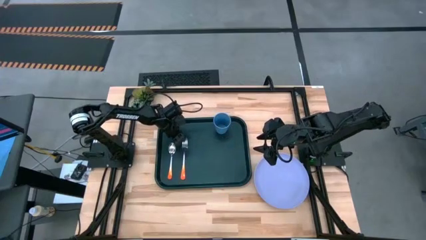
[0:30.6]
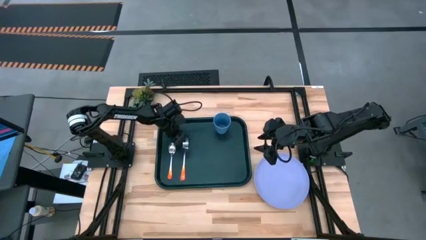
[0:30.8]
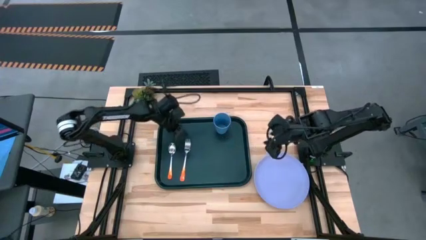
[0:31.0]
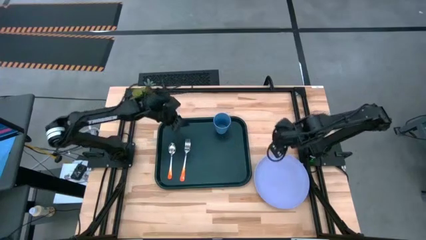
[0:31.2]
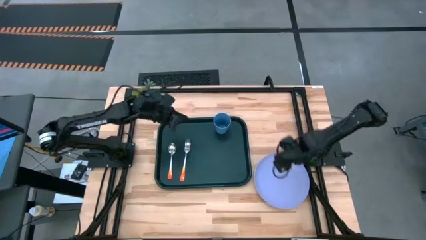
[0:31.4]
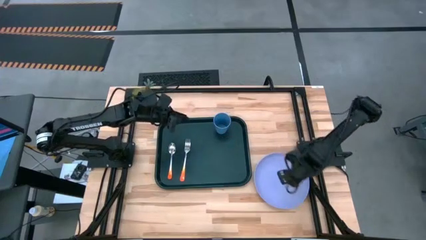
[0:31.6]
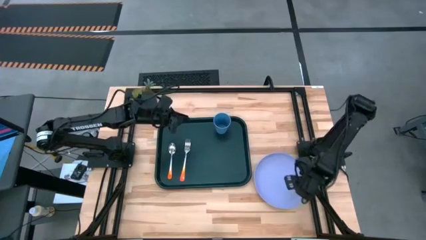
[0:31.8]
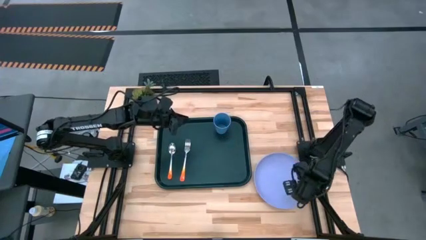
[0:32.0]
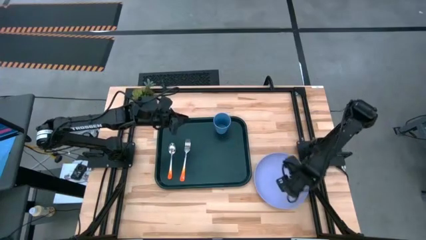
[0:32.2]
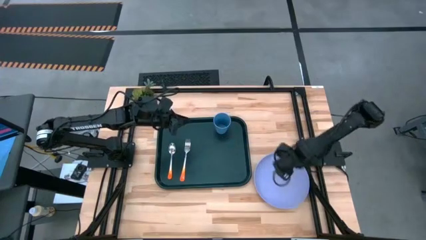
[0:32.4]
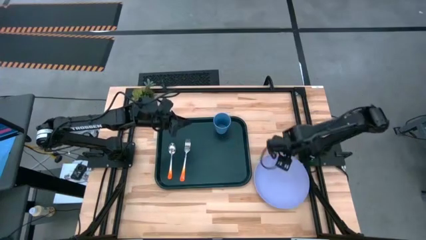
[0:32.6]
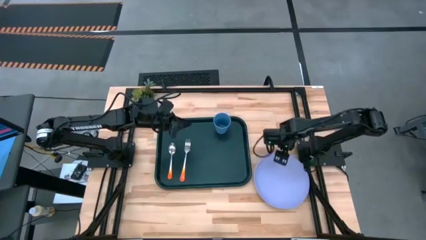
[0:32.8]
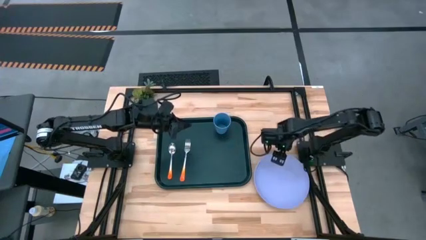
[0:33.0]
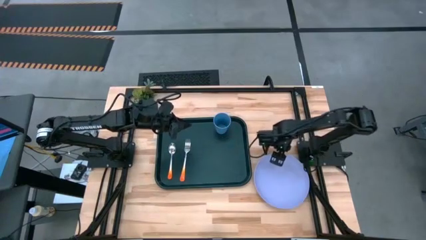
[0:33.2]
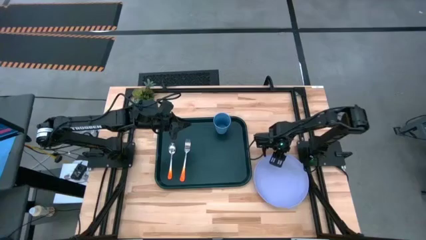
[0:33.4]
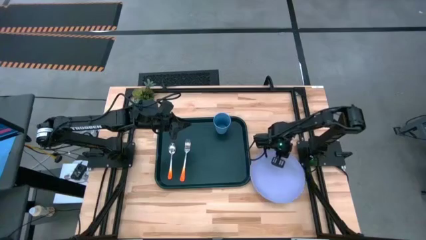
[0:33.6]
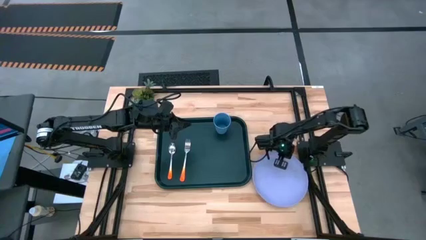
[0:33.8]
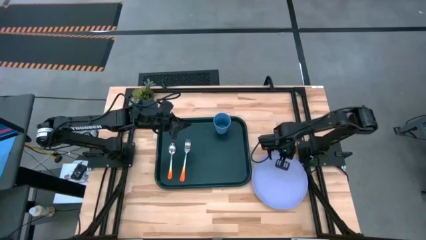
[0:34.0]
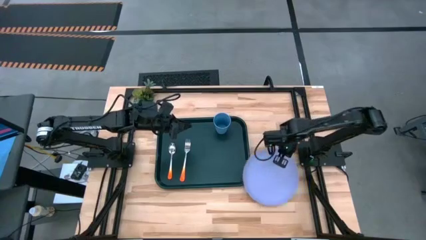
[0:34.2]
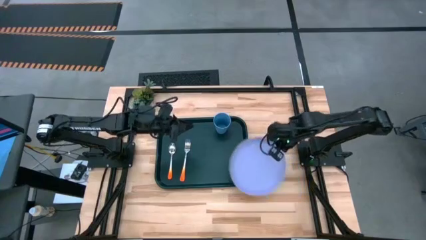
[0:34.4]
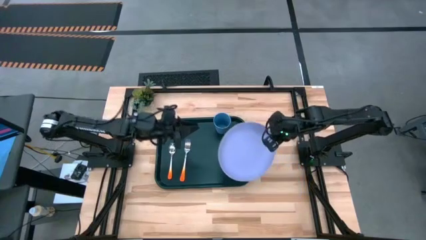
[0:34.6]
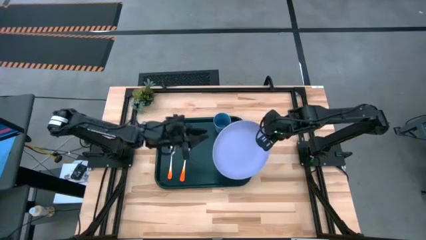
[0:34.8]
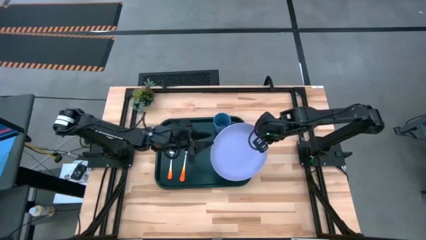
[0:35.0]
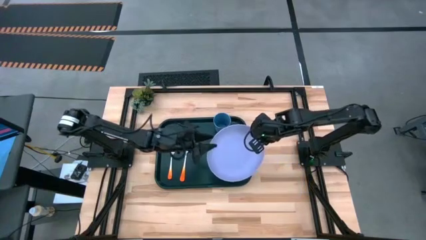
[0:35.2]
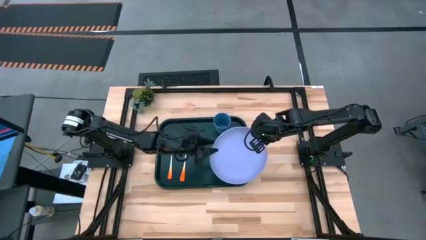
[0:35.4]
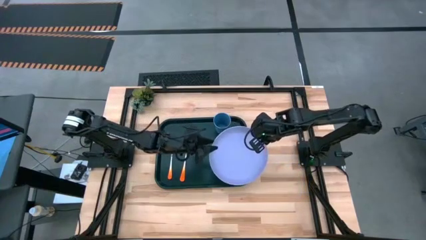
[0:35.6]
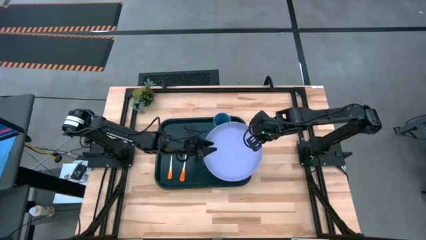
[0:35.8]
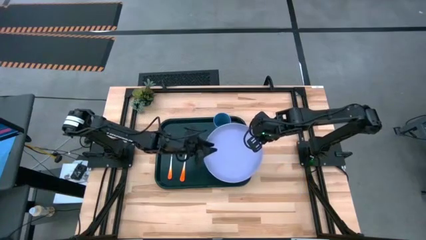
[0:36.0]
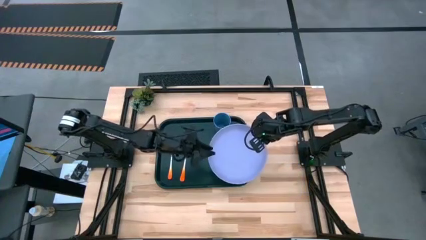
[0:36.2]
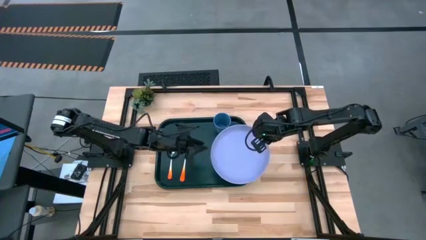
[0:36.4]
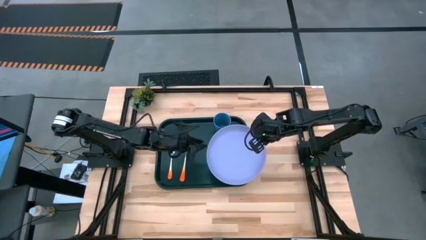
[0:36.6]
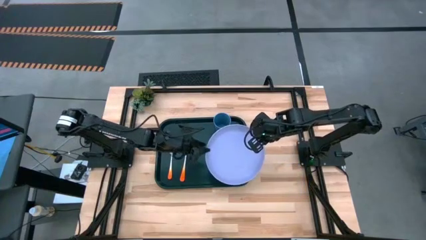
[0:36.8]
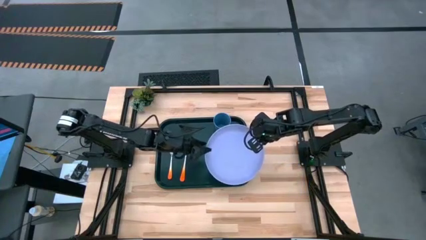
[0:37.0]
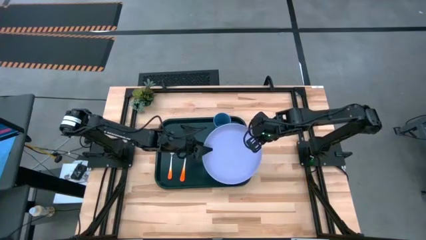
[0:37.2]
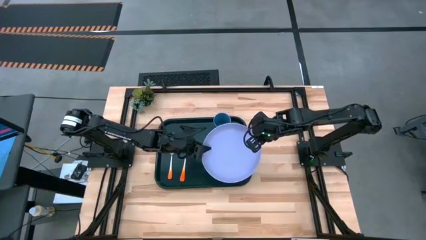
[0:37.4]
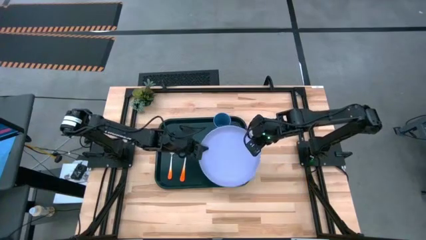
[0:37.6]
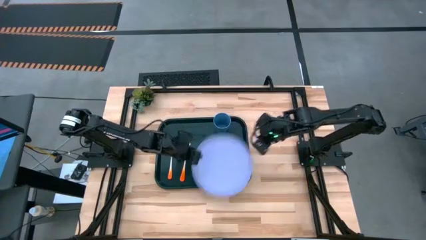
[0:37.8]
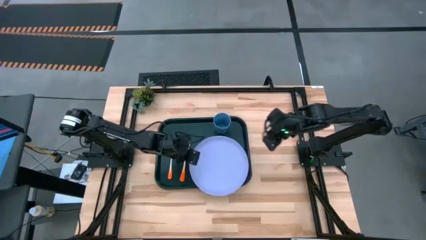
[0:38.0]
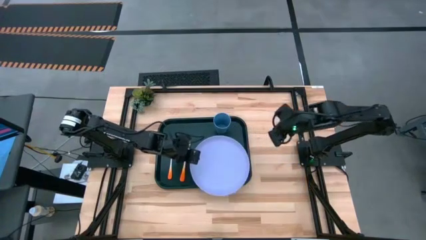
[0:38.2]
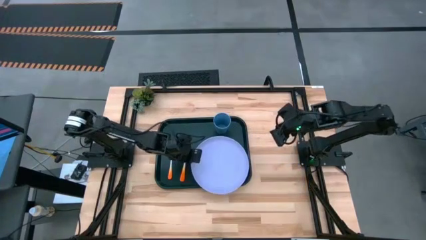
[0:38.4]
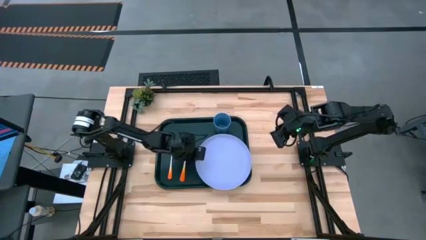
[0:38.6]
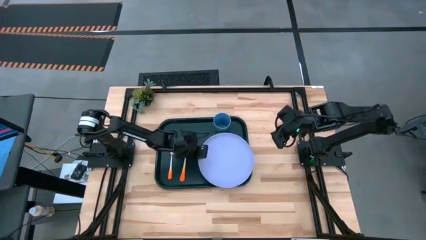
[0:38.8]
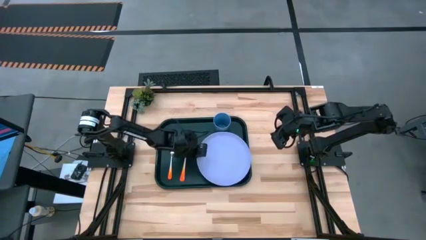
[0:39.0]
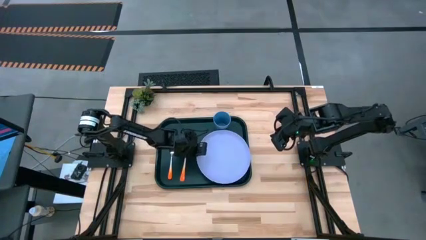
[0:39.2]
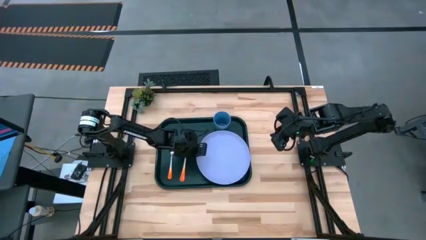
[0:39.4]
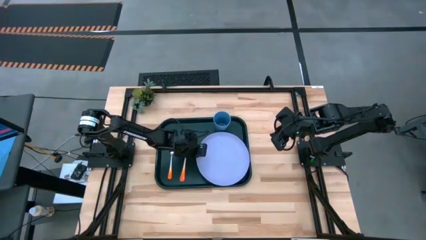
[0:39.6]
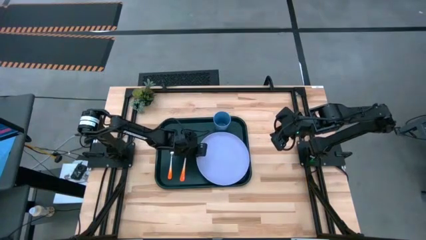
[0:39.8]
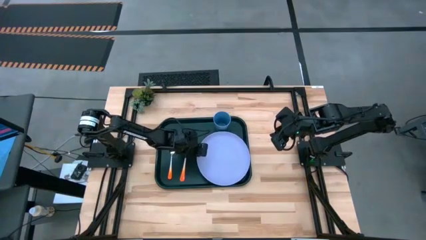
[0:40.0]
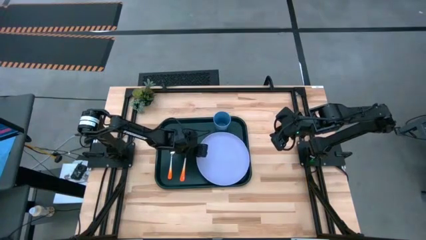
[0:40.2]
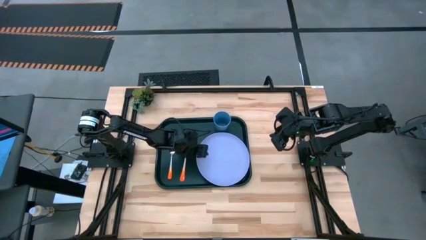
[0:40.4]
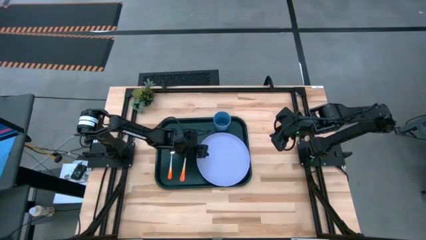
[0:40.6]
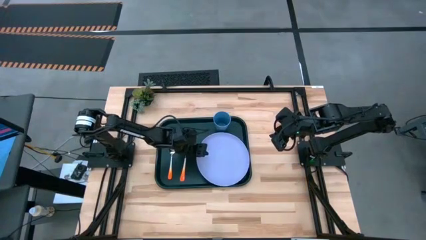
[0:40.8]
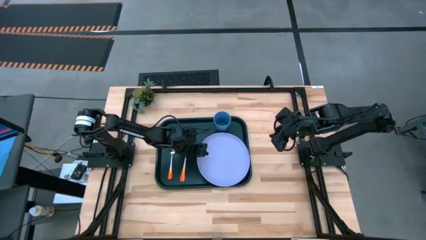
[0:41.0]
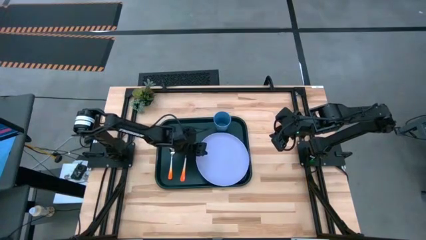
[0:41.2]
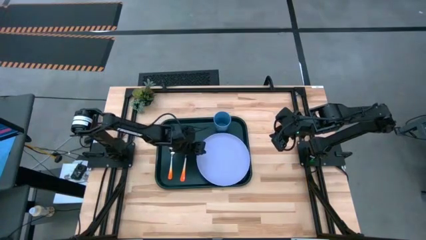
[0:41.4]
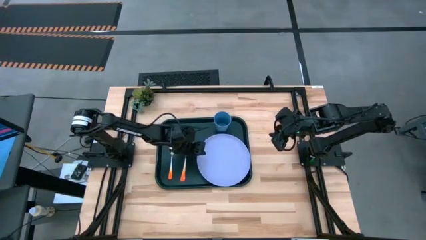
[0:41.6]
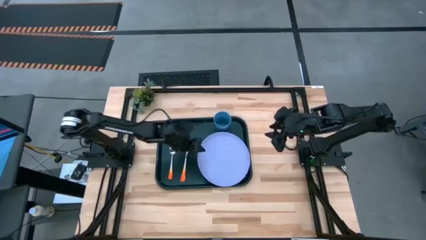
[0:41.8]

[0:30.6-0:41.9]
Task: Pick and place plate/cup/fork/spoon on tray
Put the purple plate on the black tray to the right of the orange fork

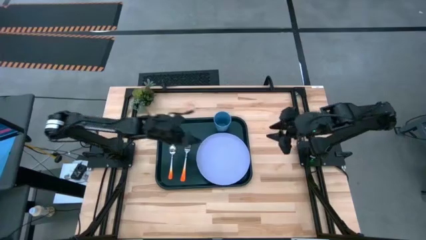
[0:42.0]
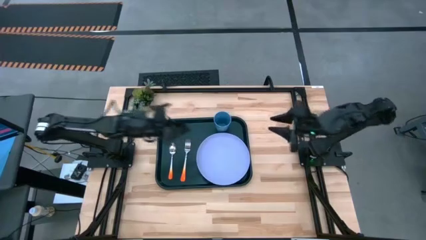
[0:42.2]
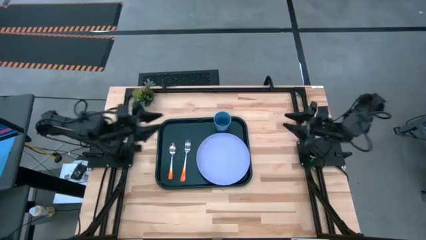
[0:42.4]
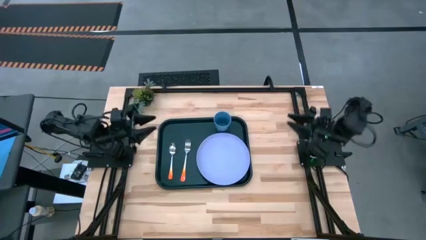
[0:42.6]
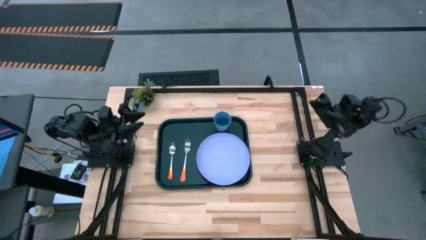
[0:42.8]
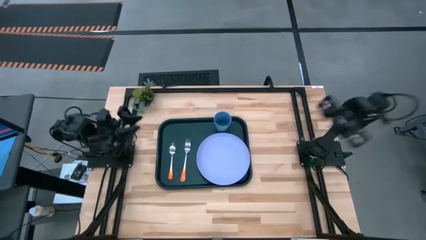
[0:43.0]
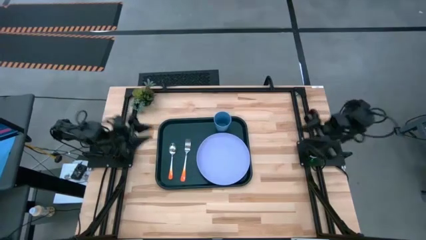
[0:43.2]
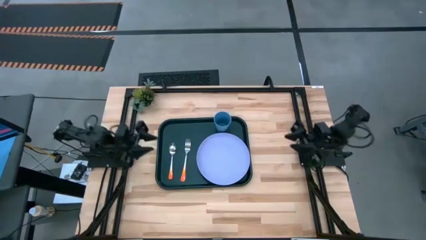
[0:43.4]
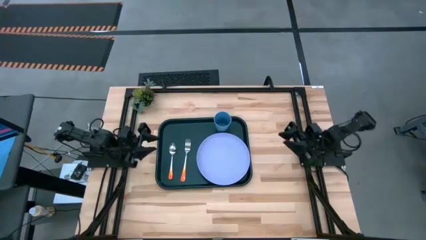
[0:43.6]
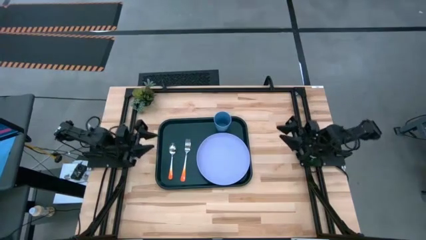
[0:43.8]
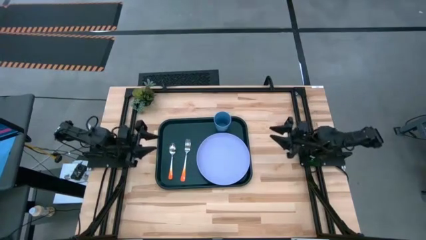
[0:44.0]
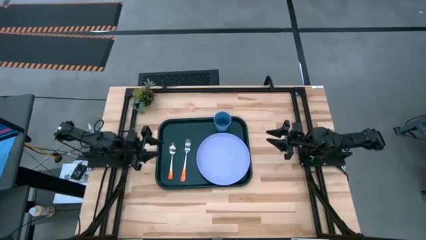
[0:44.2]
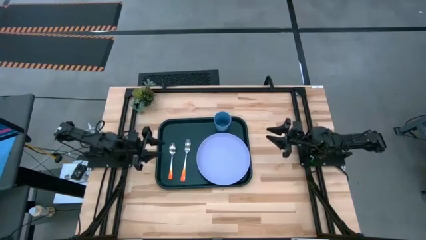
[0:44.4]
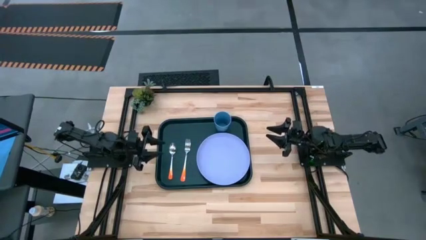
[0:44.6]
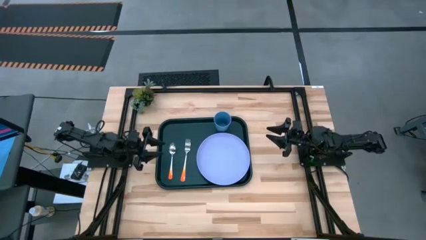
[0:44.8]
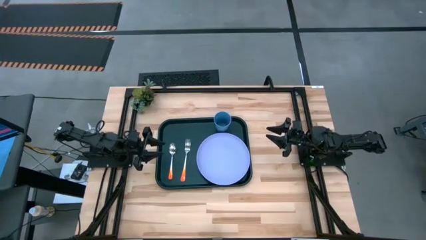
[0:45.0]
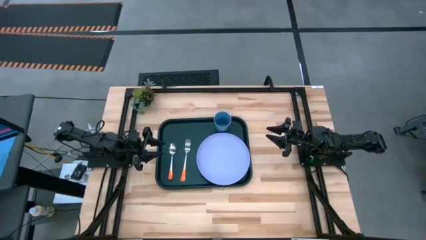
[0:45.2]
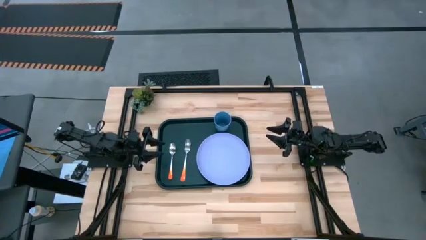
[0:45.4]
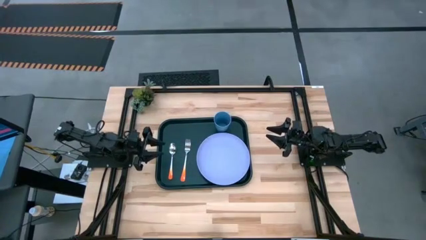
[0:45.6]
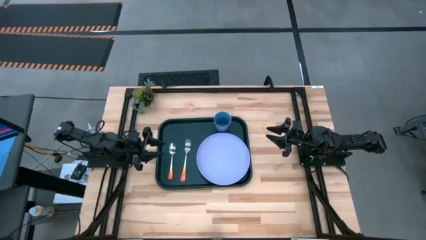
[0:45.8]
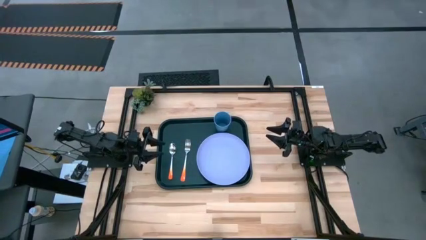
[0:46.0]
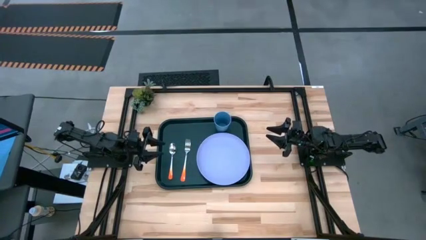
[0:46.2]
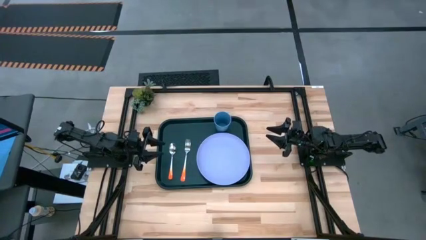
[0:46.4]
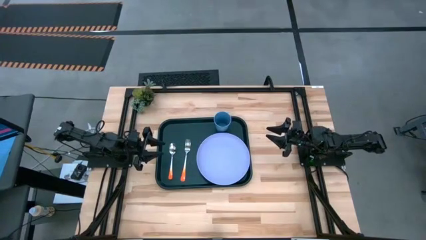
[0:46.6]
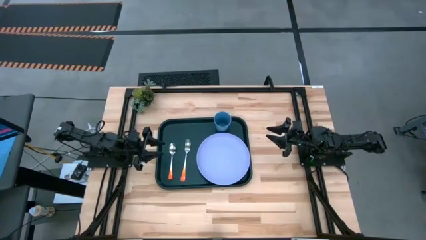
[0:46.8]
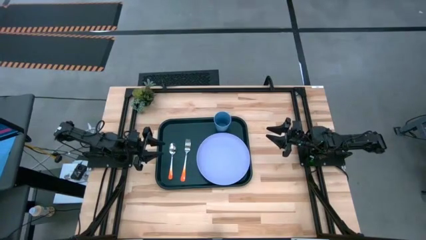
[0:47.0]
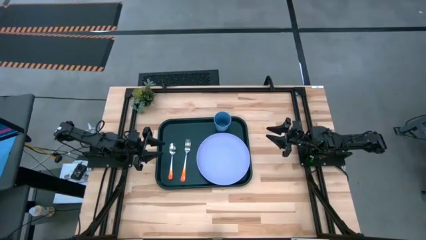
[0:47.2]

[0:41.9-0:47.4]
Return to Home Position
